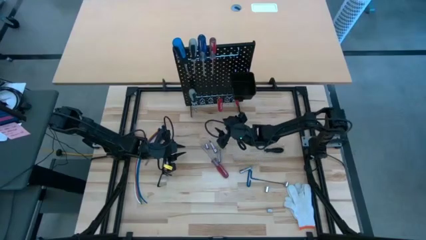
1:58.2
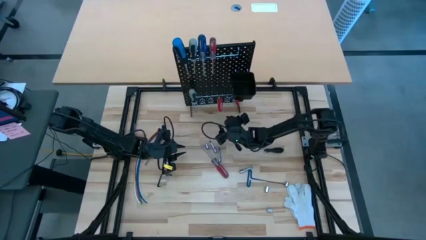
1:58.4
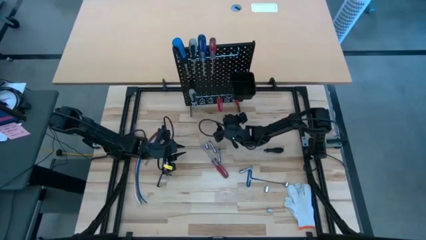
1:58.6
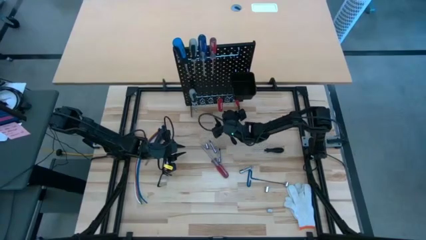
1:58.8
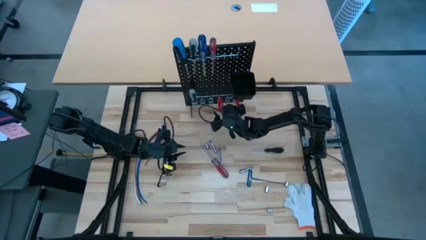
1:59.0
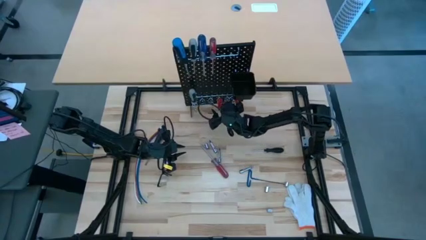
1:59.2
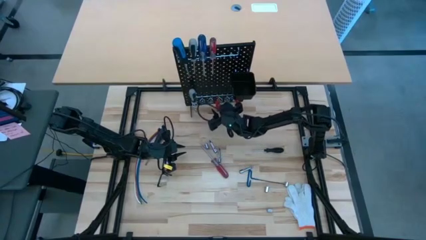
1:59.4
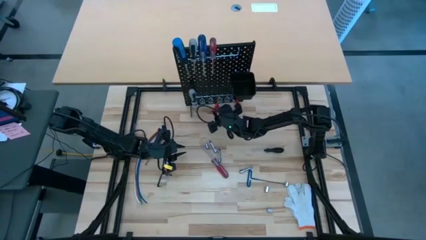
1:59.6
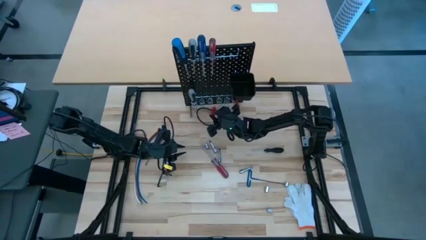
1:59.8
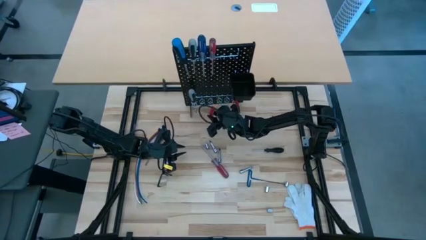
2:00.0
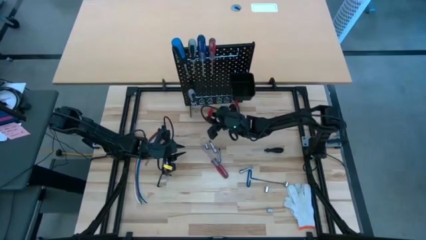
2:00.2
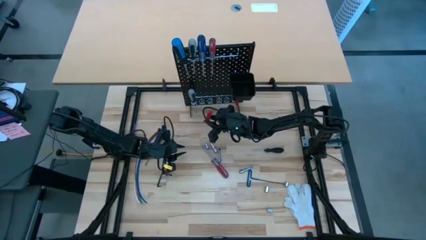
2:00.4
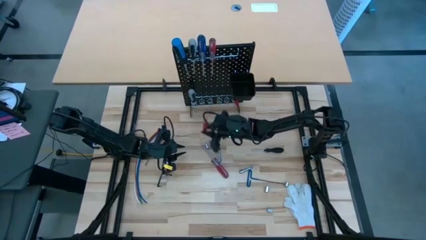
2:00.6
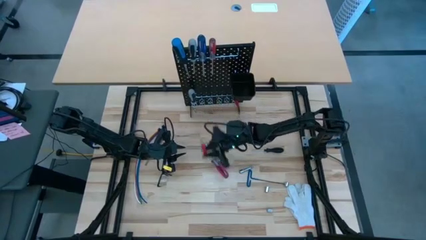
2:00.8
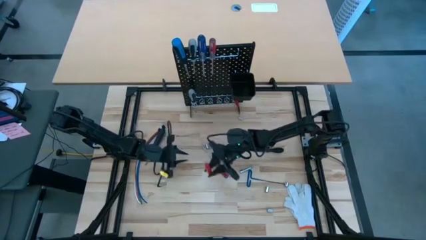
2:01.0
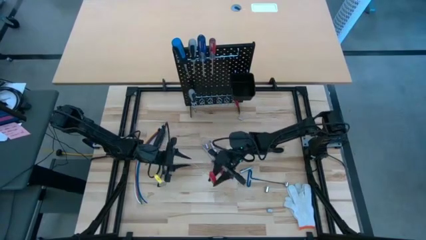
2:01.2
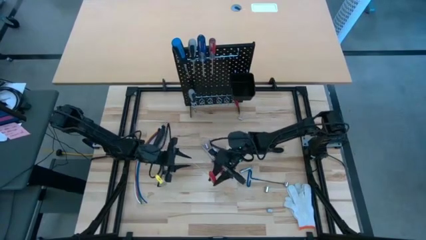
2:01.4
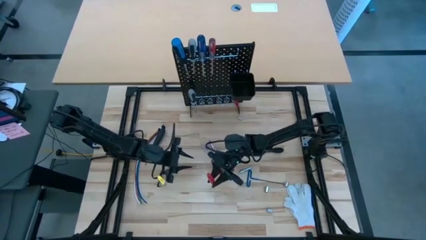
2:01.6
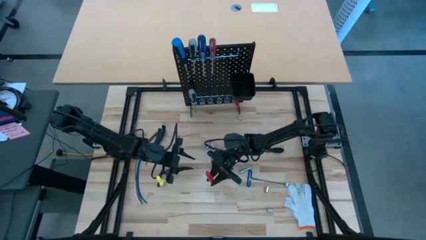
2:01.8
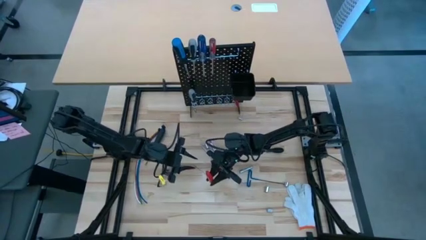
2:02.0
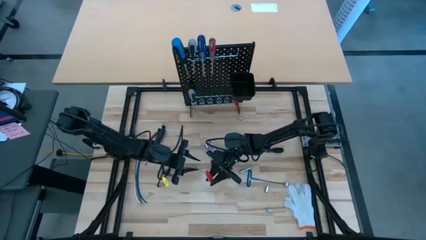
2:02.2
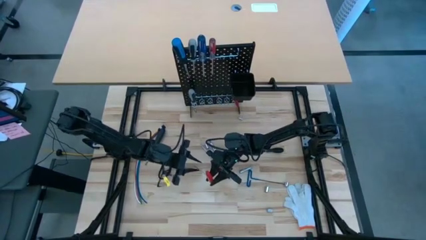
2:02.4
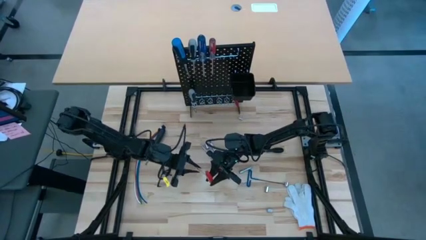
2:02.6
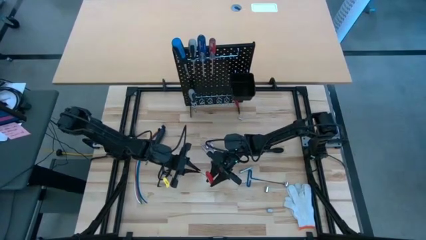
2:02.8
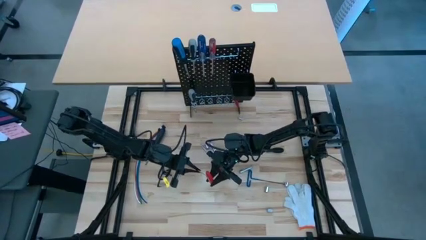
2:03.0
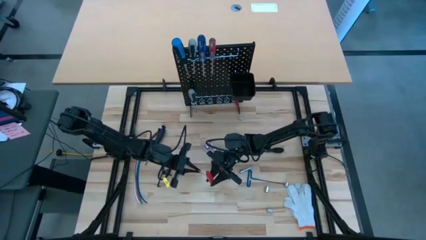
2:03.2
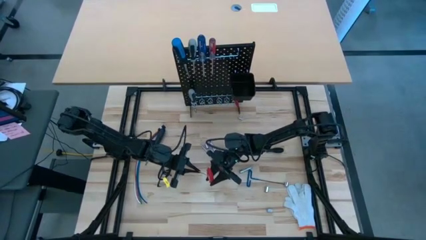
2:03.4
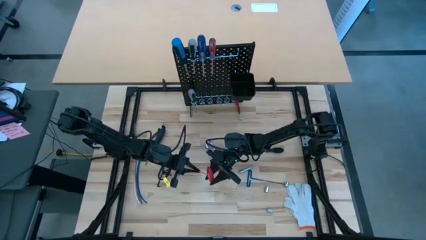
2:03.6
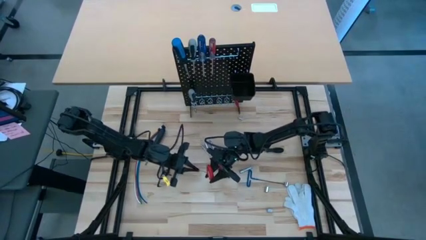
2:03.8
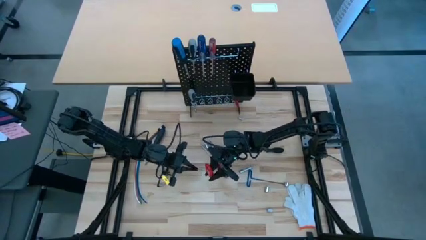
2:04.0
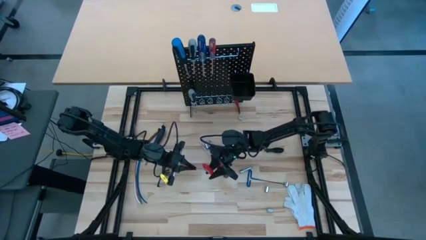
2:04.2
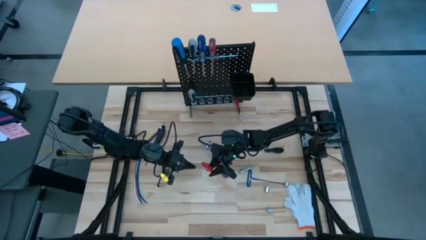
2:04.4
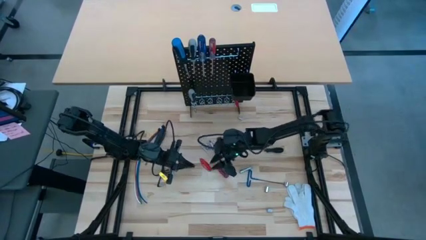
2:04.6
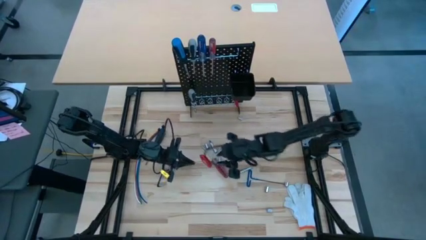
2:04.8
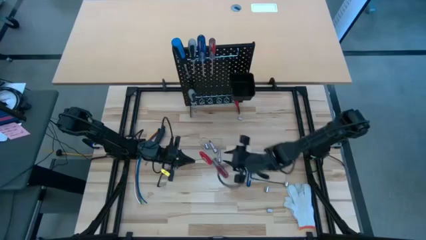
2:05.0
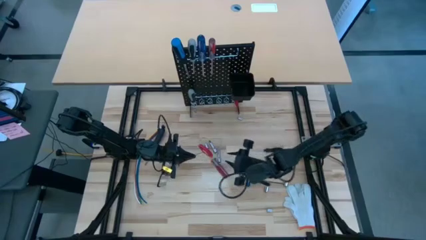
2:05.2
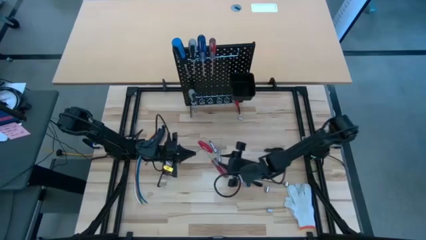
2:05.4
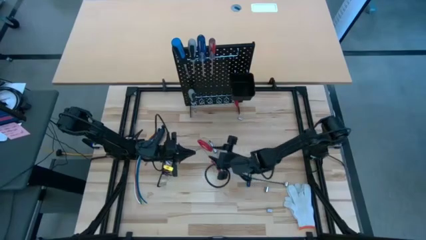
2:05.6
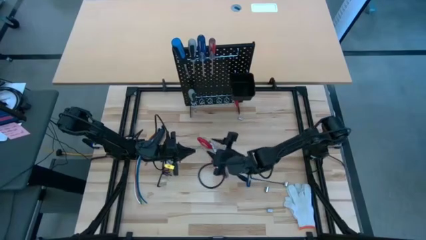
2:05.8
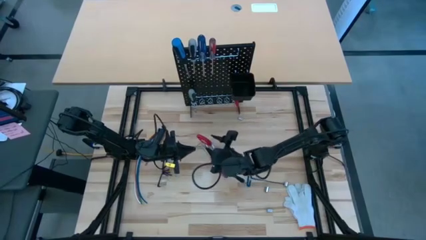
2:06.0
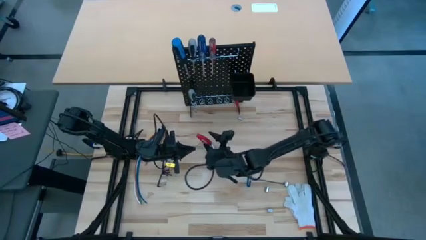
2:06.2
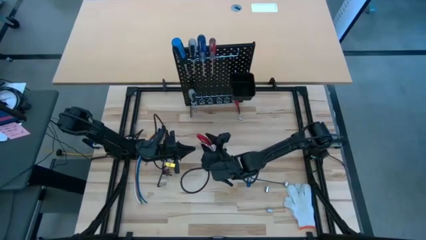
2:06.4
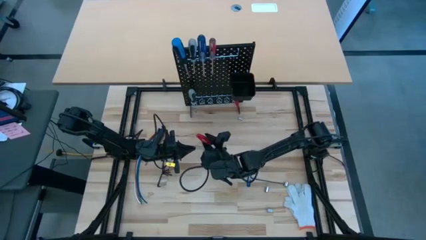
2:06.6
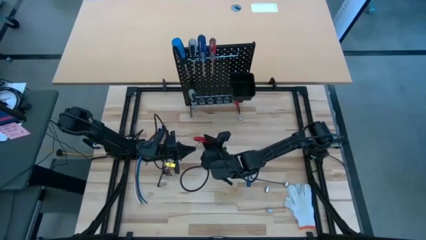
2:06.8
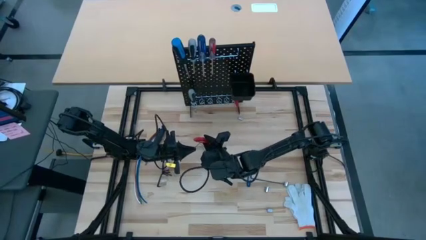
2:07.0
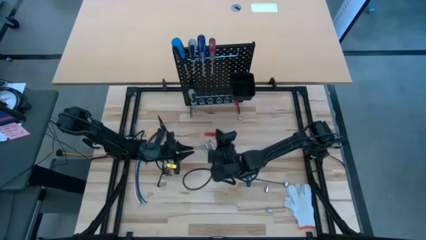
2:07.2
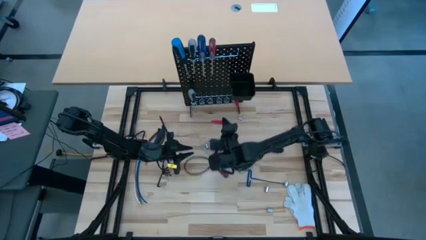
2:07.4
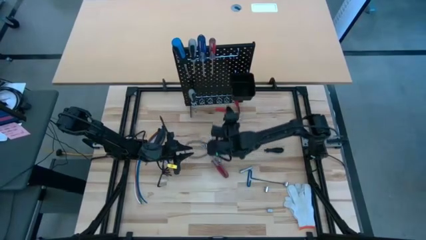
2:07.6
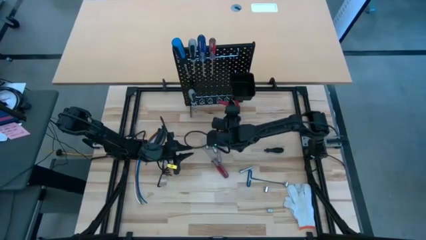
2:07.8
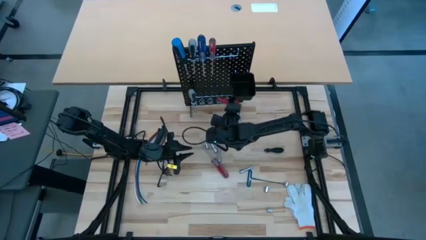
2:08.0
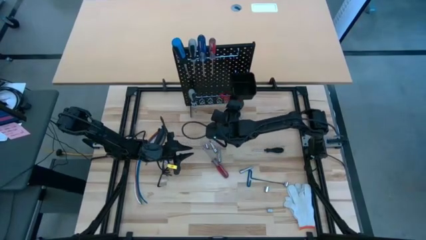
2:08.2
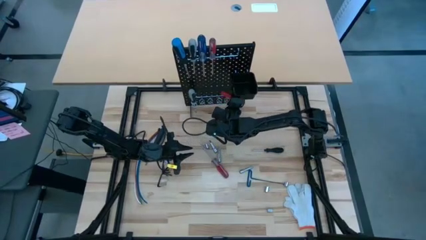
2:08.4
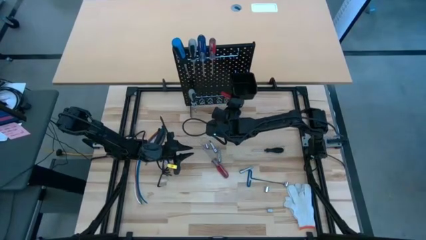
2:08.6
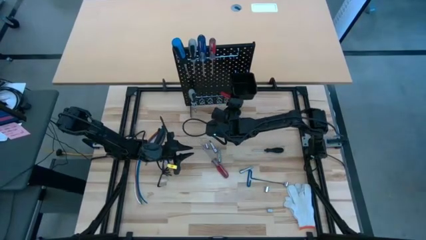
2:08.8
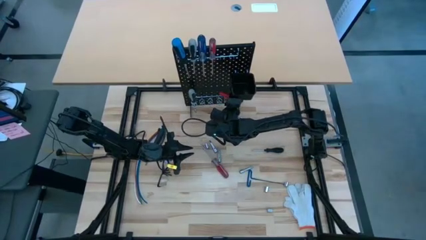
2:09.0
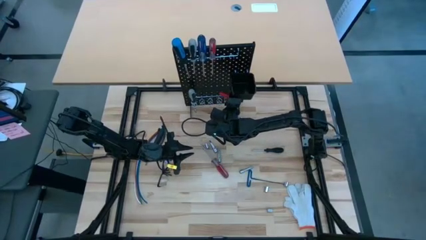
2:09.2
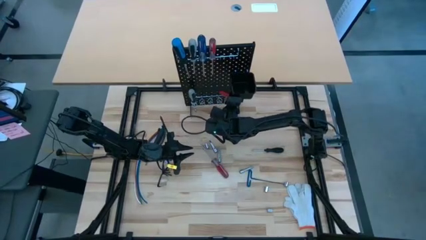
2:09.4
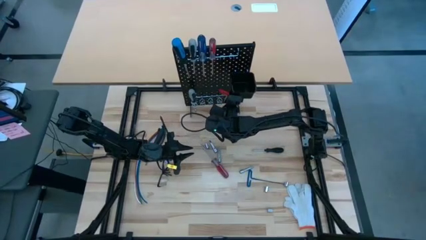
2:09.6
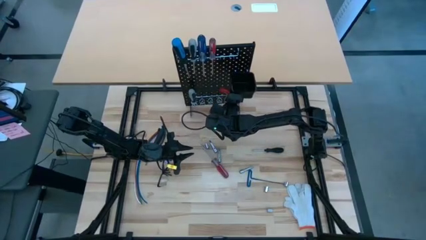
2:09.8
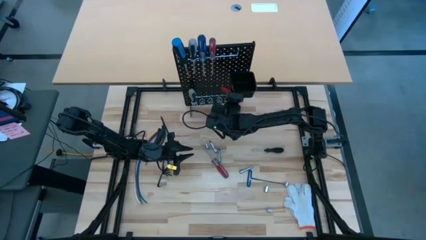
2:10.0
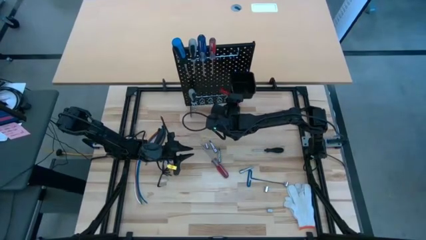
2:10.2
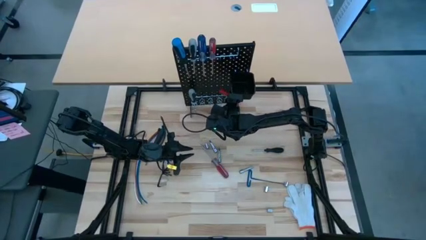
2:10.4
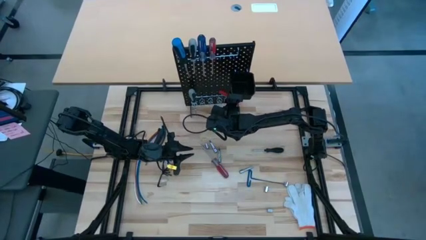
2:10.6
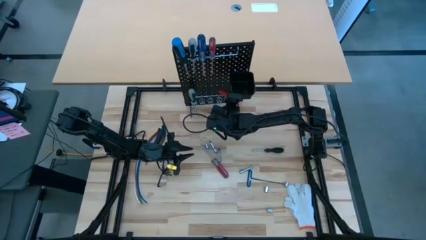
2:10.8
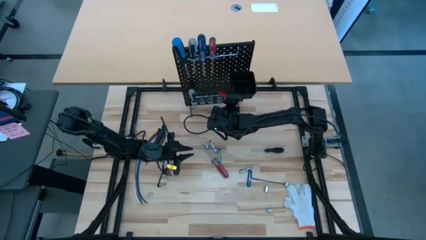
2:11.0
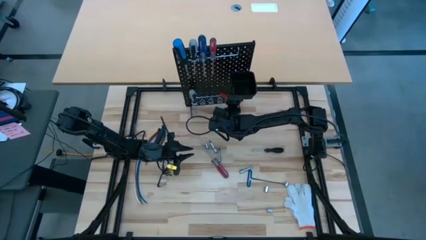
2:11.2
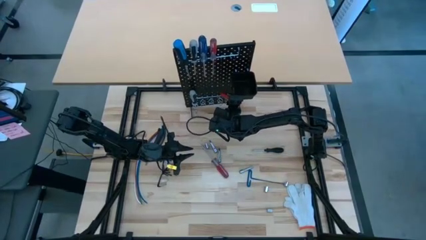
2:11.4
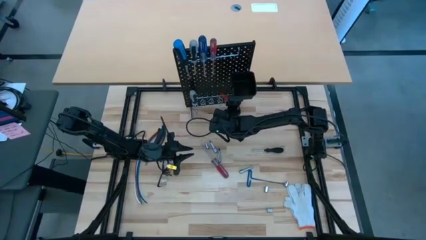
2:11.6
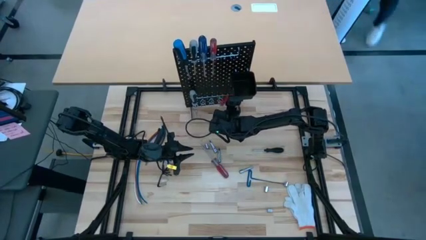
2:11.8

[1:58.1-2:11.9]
Task: Hang tools onto peg board
Hang the allen wrench on the pegboard
